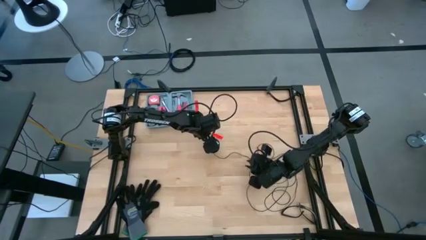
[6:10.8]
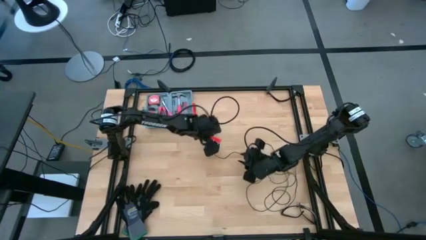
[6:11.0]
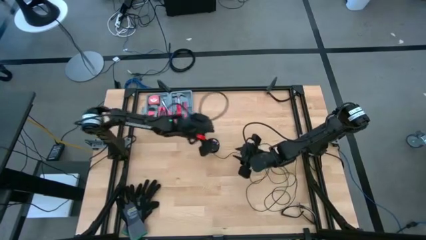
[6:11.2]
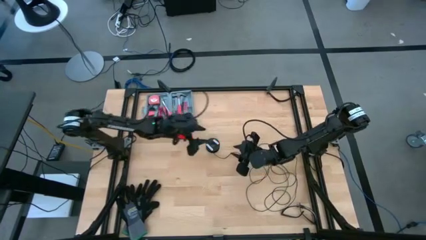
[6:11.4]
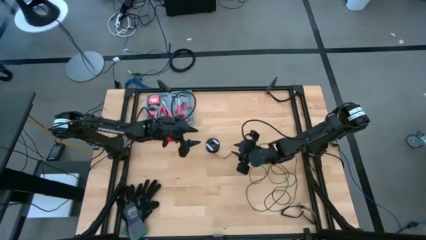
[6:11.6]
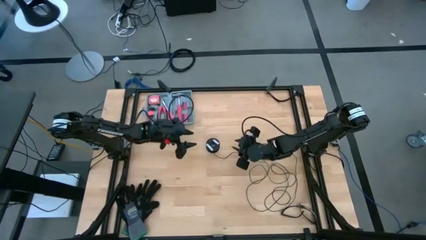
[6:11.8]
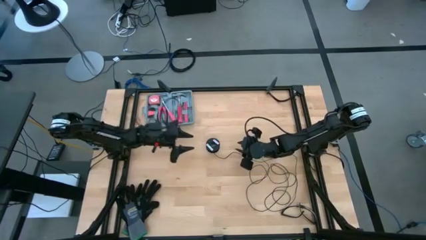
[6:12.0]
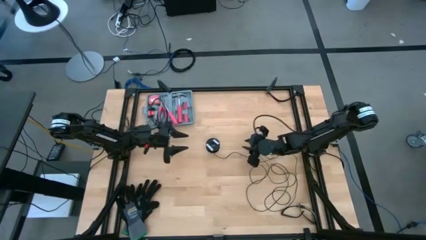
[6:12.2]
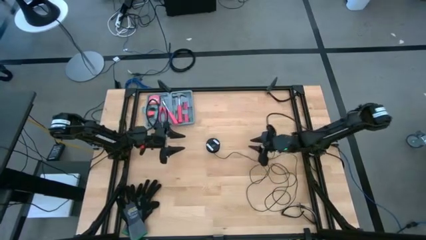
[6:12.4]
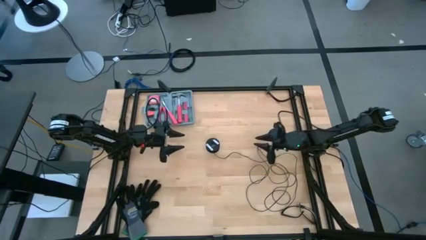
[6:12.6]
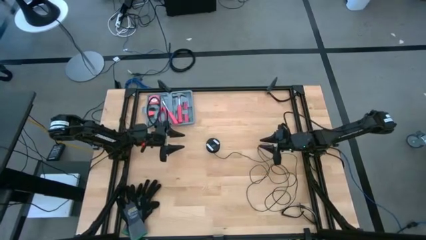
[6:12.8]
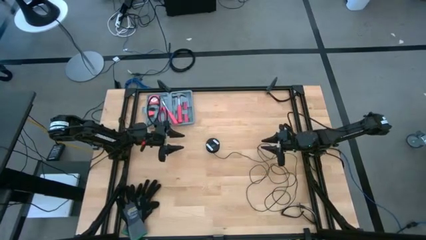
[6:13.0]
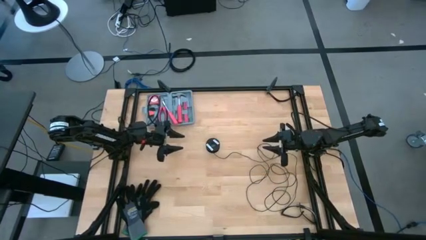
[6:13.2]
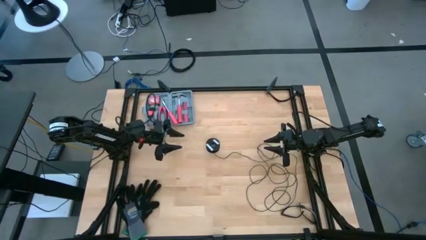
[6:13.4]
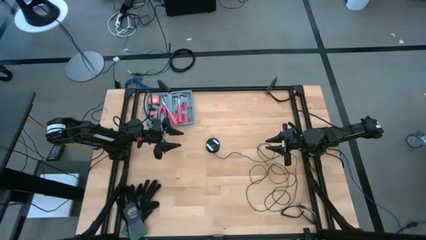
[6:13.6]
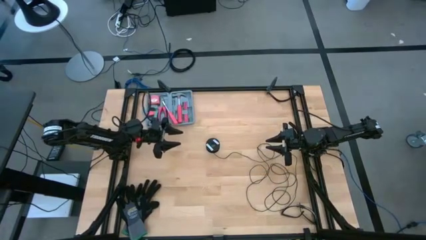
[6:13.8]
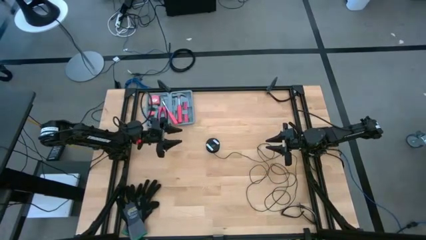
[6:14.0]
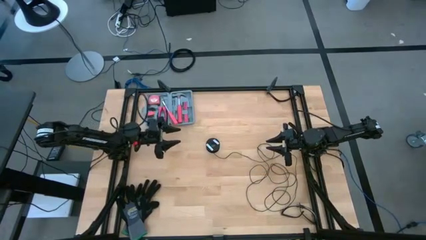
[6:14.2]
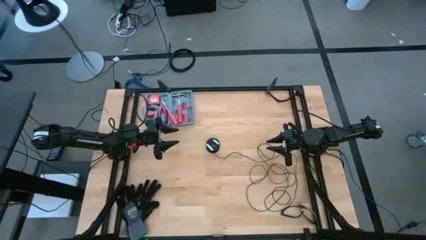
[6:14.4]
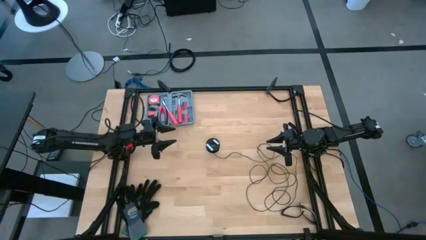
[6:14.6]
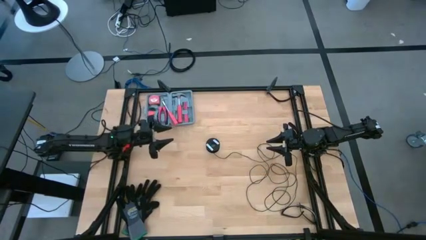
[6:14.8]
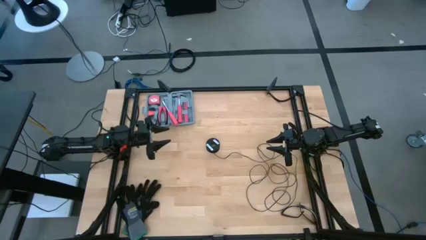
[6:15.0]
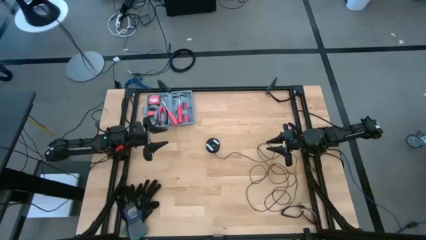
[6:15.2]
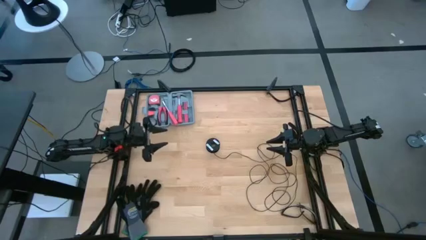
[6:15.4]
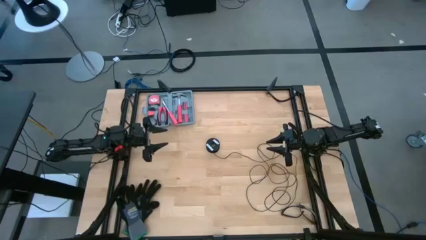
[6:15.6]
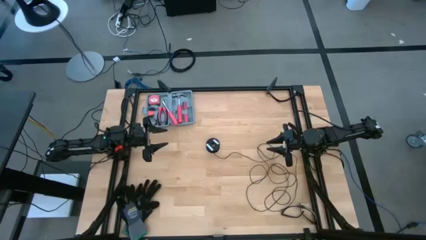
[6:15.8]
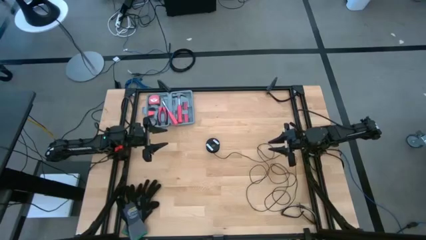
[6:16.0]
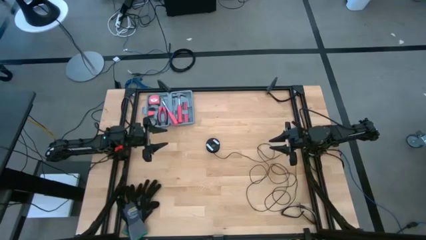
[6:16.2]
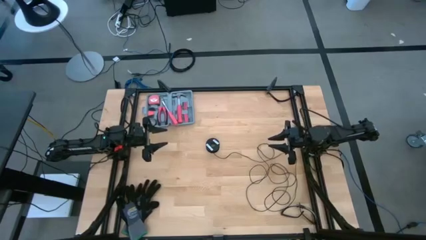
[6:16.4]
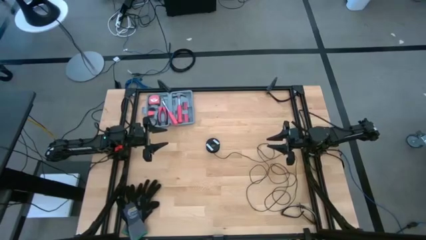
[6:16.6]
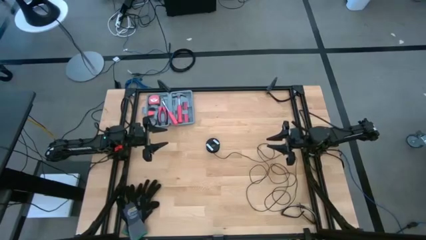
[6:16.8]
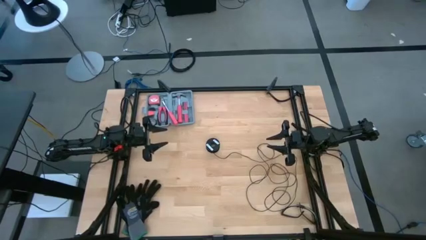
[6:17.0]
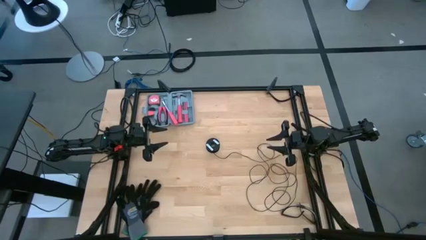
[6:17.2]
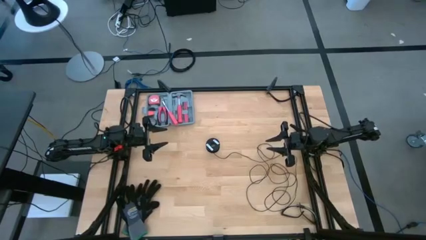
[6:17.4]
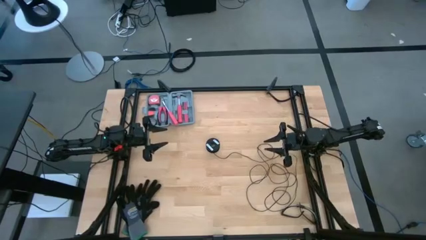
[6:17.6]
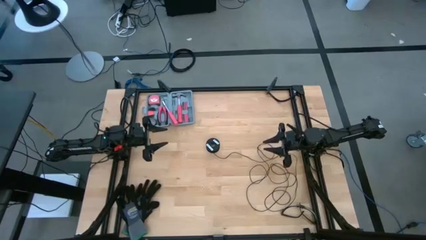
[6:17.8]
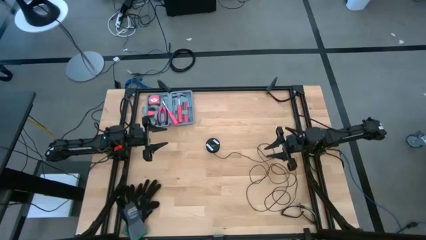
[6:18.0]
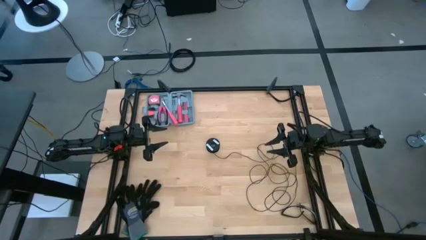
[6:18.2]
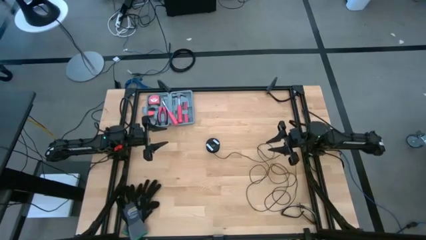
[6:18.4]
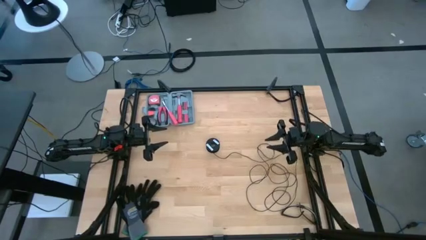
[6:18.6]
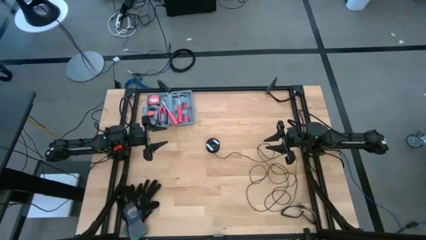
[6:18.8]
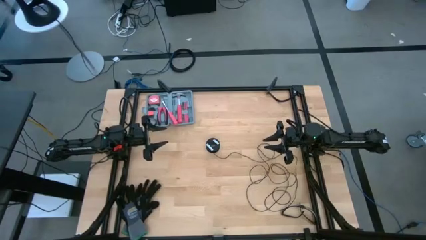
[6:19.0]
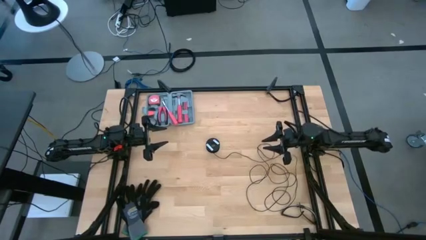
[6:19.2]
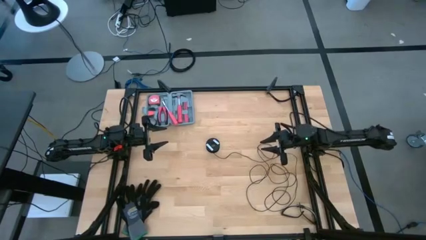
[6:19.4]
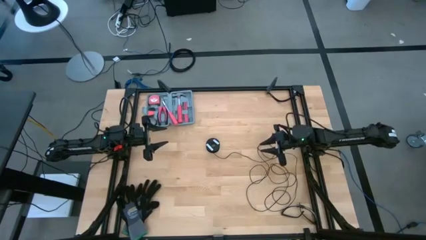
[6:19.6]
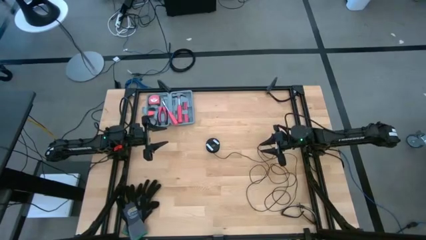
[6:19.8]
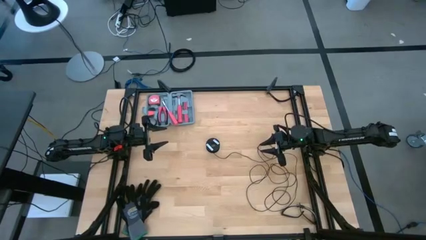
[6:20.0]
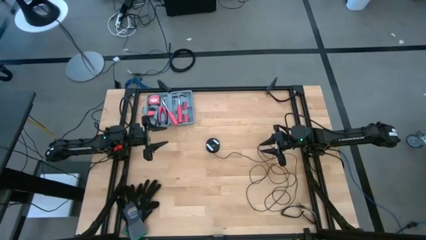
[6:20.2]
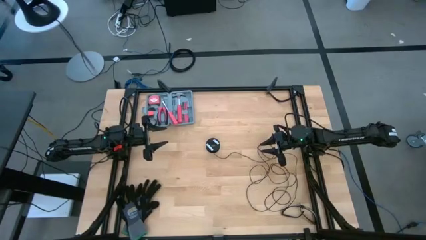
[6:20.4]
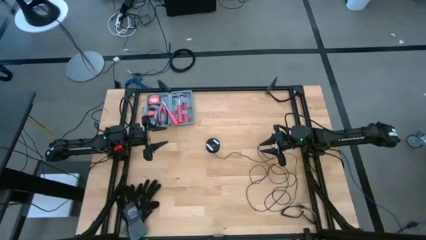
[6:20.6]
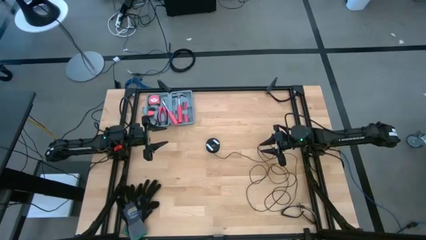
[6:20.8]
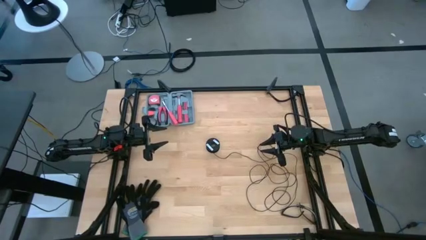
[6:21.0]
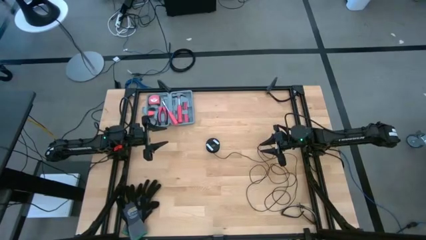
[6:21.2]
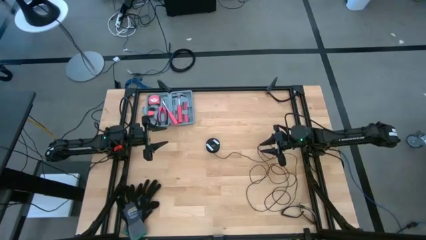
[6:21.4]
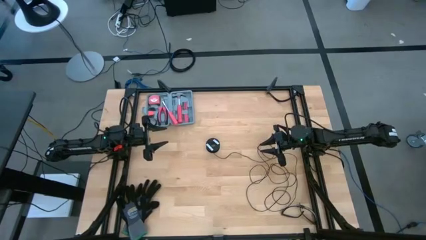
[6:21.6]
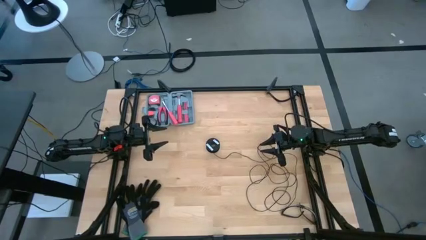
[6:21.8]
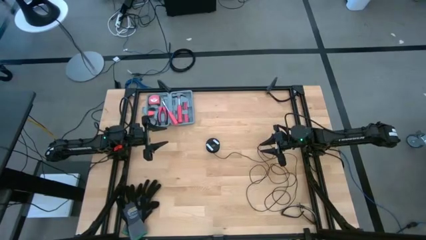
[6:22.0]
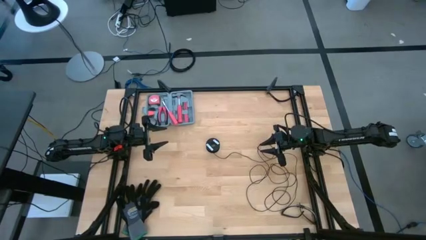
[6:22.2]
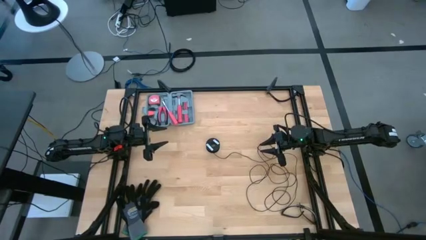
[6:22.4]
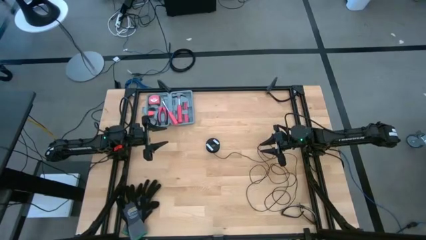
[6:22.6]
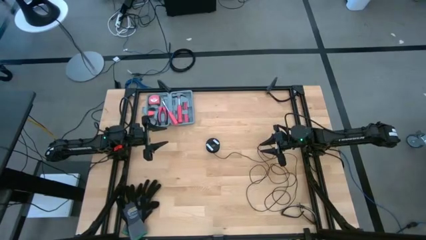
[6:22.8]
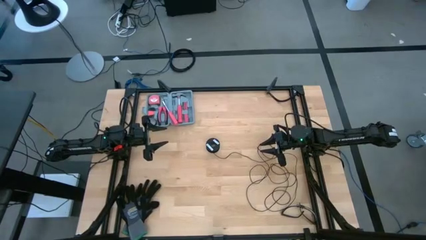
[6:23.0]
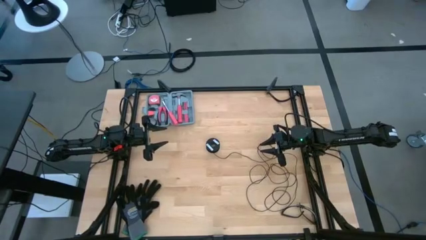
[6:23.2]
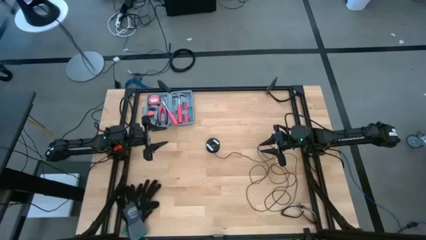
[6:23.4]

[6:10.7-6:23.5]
Task: Coil cords
Return to Home Position
